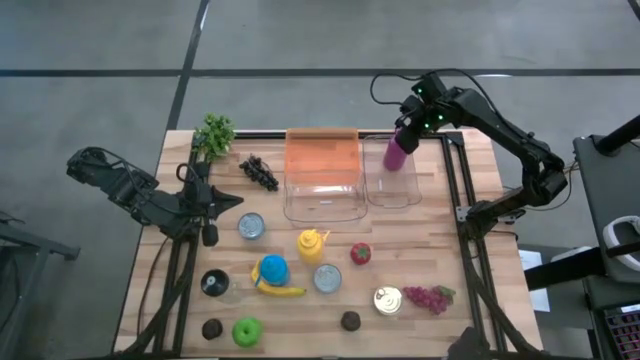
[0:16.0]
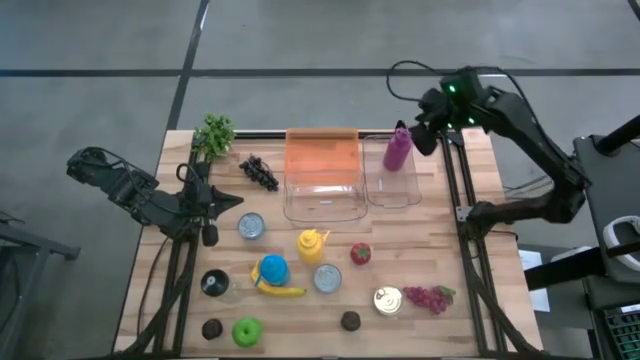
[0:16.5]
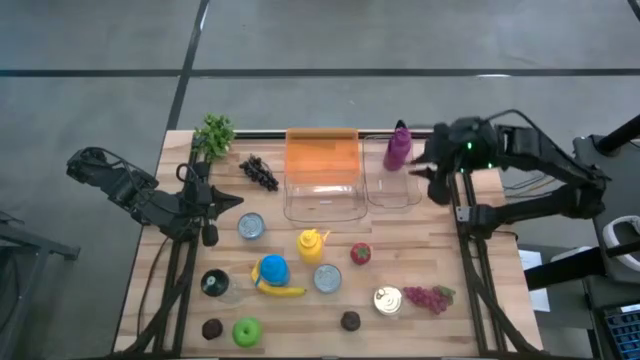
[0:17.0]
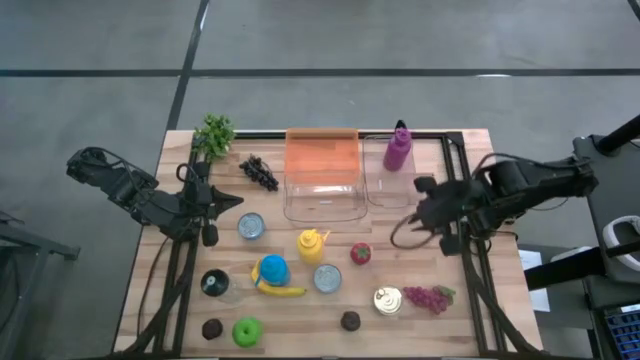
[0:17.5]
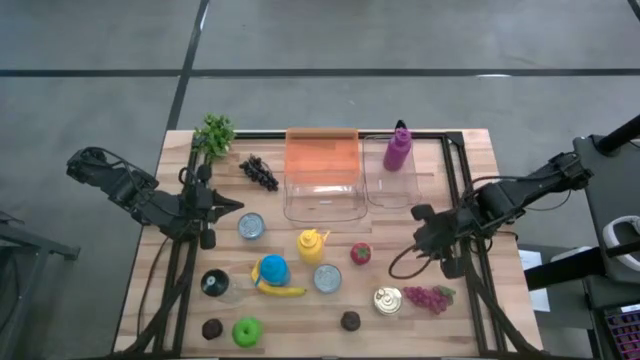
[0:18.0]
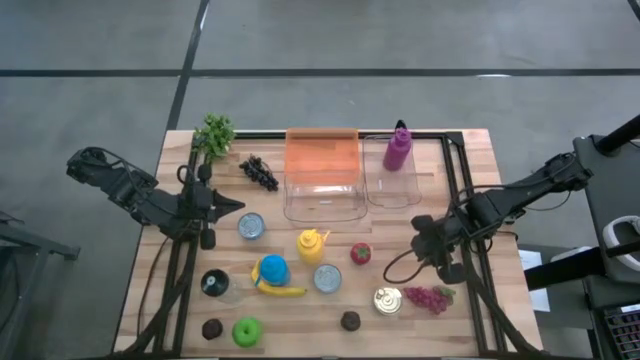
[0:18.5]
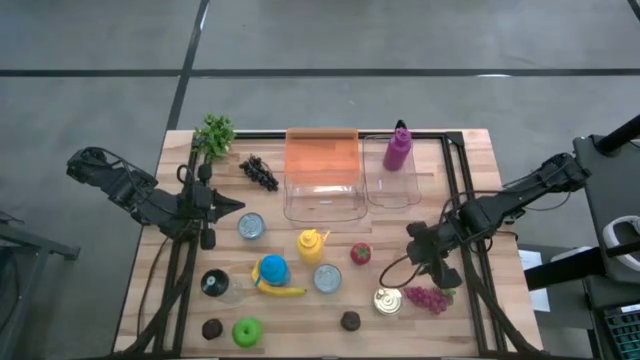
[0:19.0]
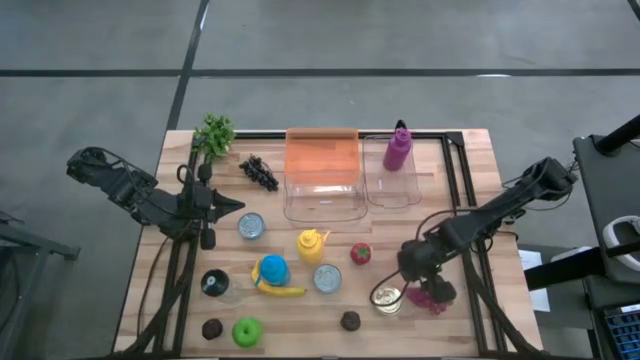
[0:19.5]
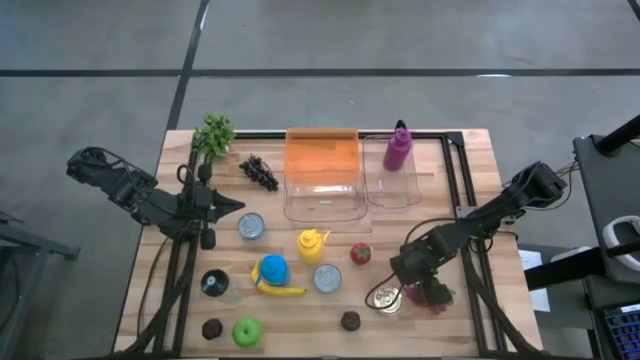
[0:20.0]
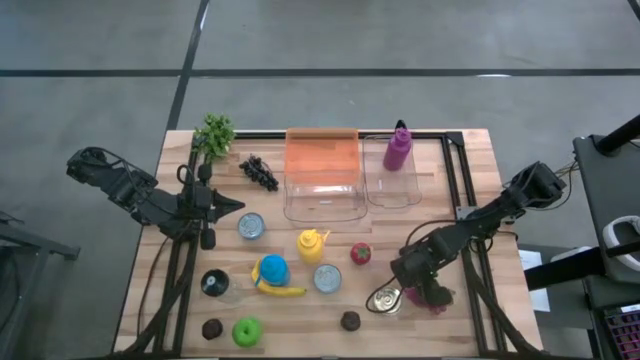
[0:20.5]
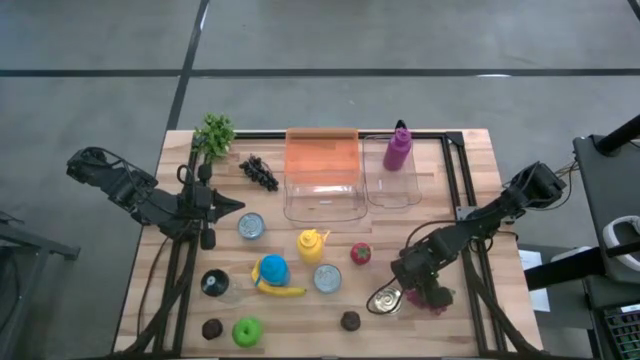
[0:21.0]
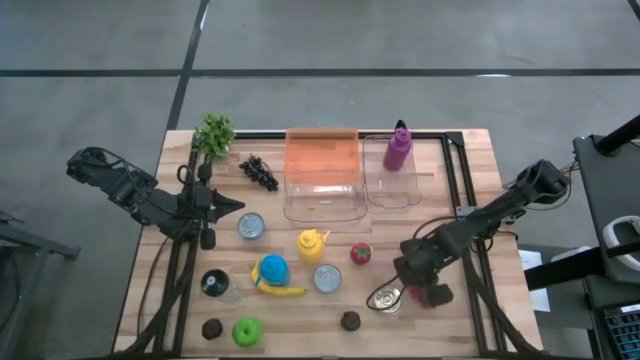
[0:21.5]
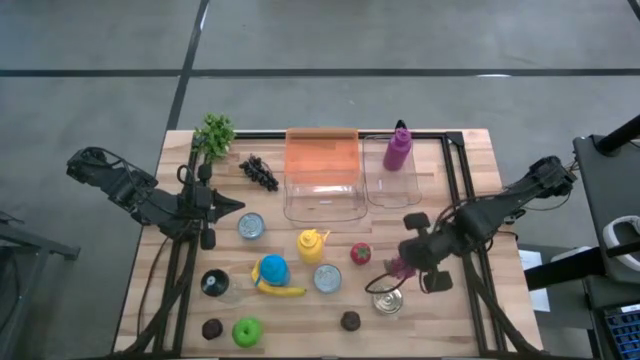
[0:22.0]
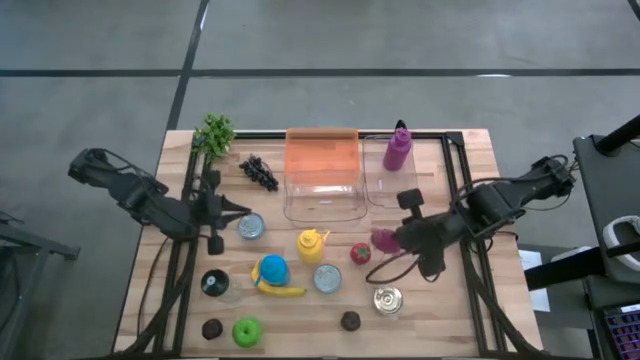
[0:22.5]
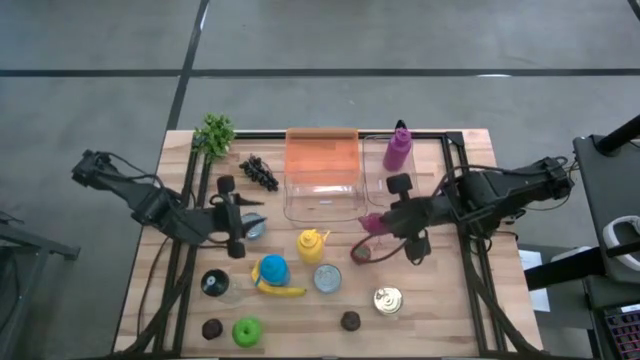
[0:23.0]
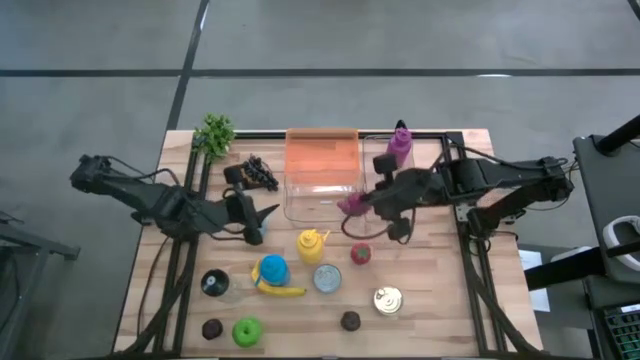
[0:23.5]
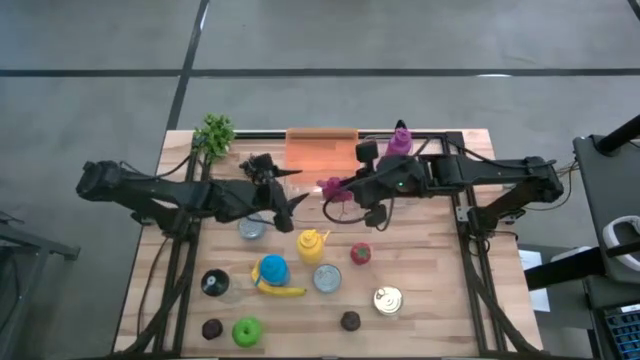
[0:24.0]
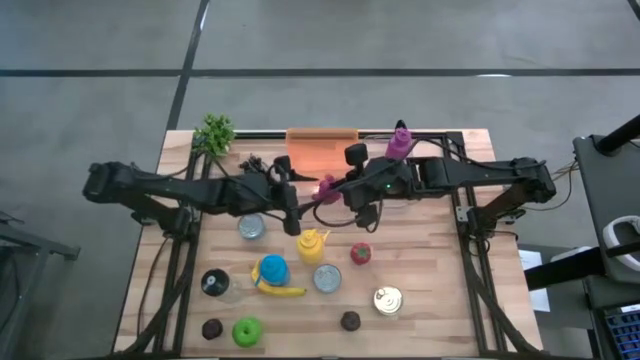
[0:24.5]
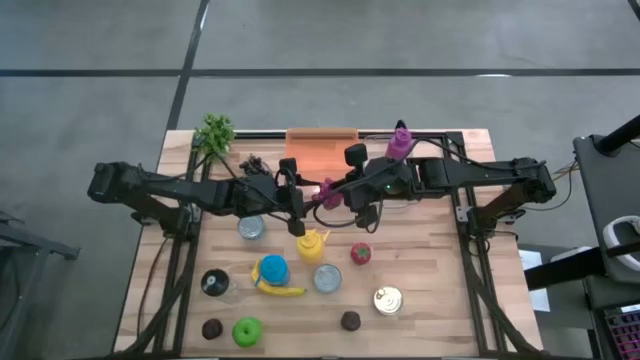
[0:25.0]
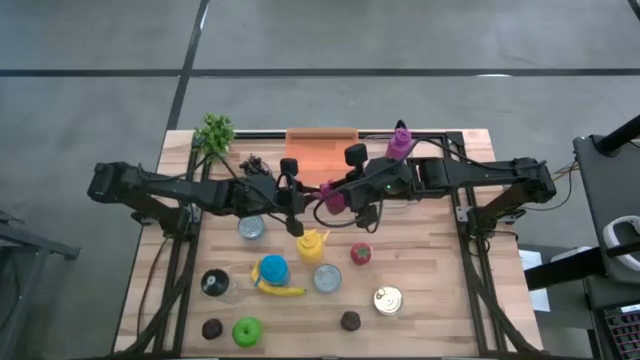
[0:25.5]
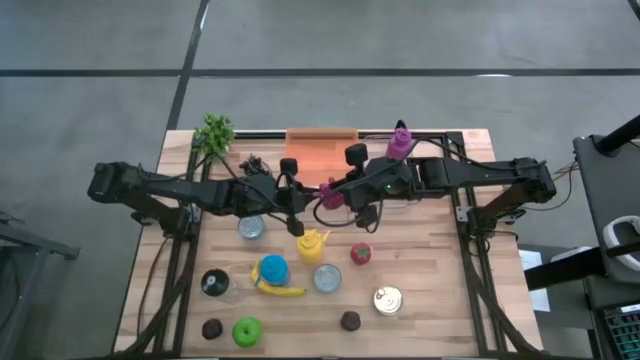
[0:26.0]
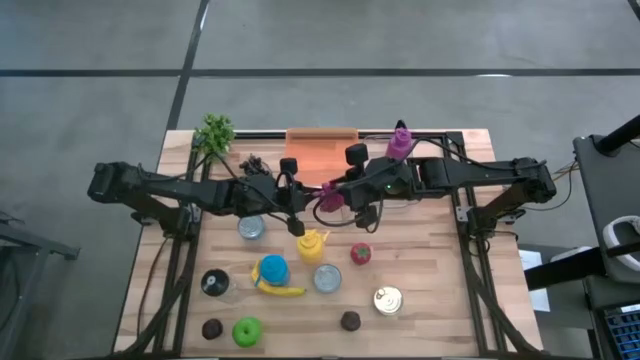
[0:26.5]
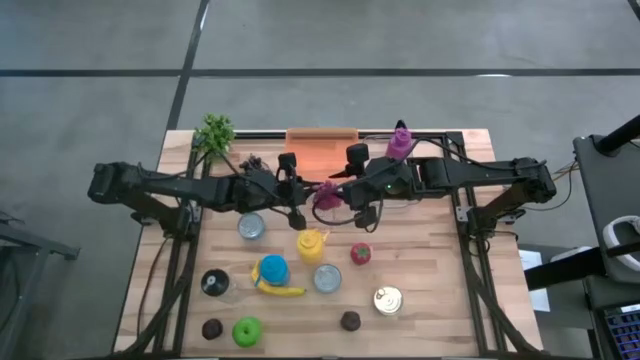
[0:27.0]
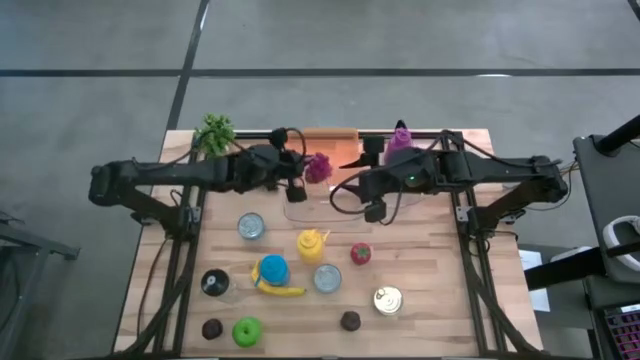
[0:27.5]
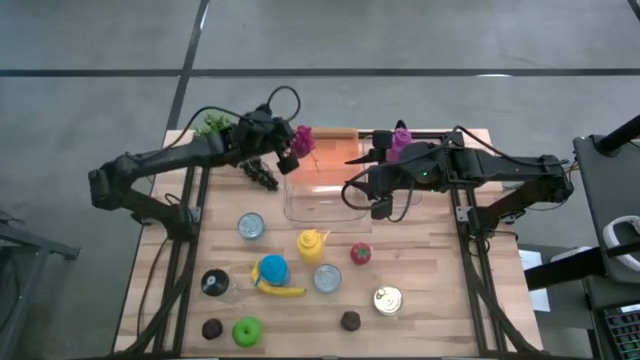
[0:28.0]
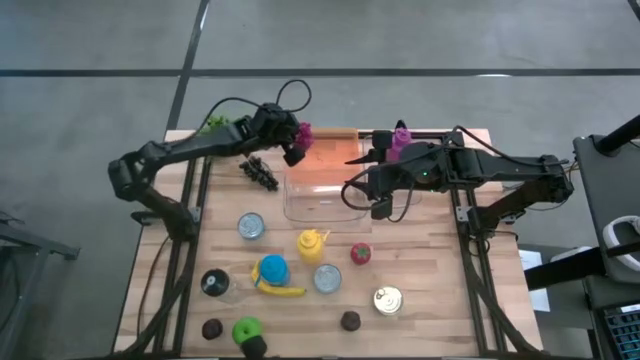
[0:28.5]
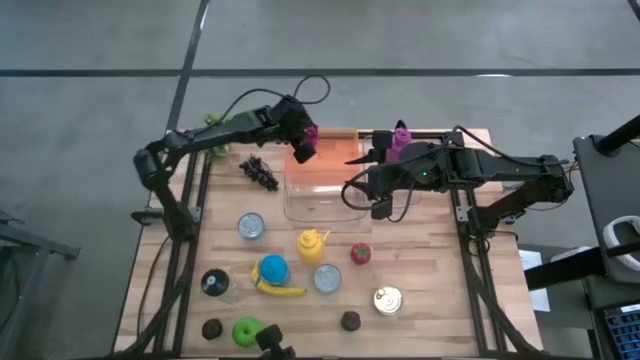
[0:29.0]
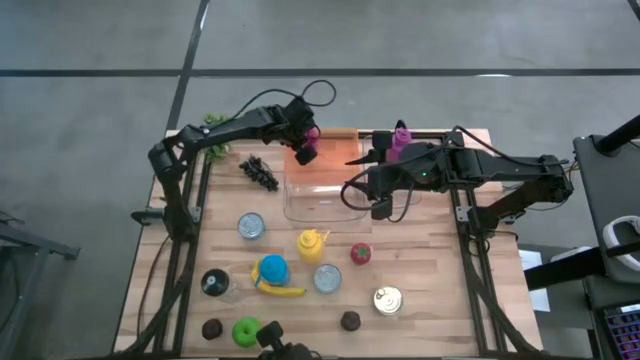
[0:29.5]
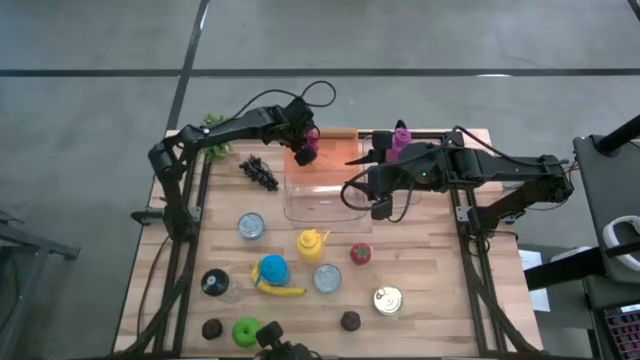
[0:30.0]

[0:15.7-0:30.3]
Task: Pick & Place Food Item
Put the purple grapes into the orange bin

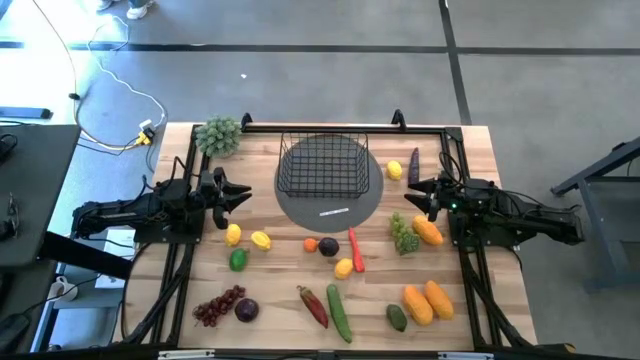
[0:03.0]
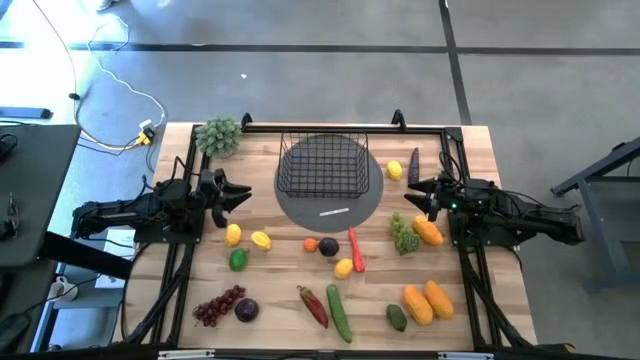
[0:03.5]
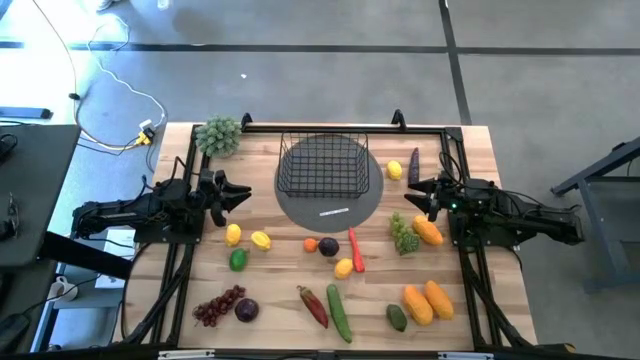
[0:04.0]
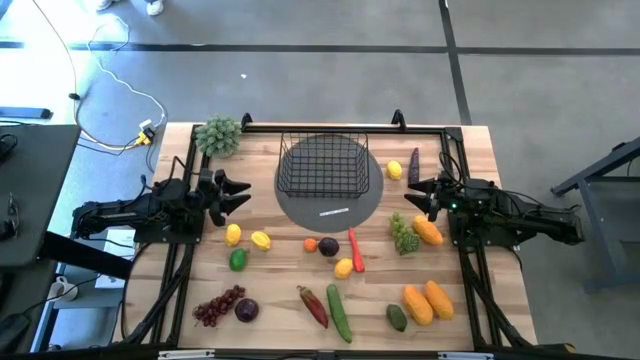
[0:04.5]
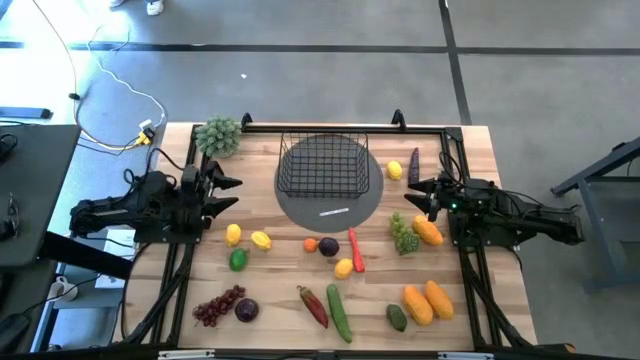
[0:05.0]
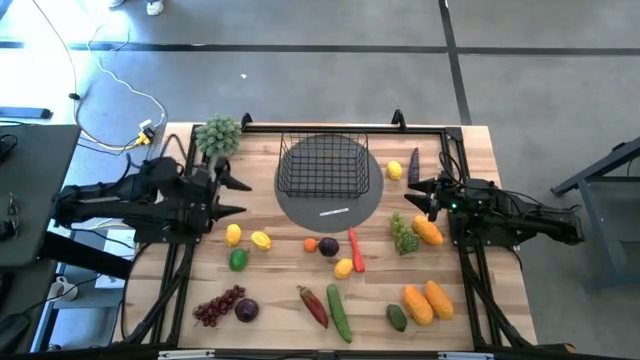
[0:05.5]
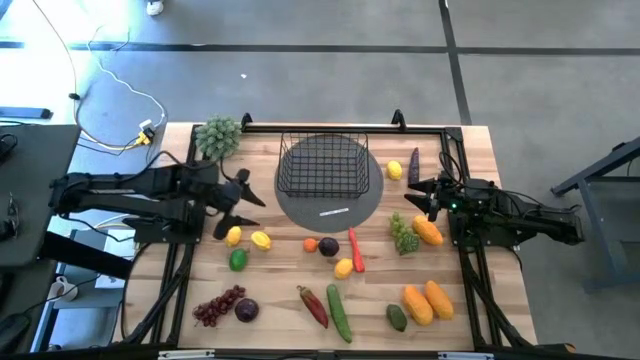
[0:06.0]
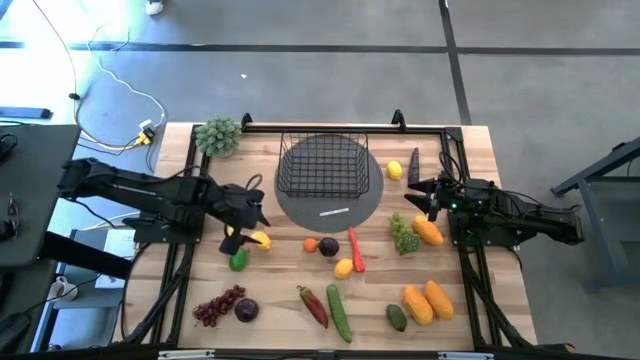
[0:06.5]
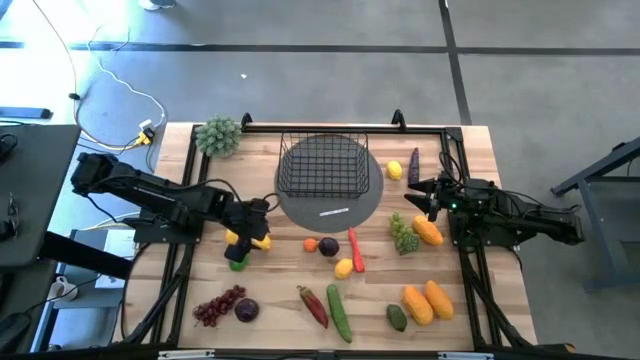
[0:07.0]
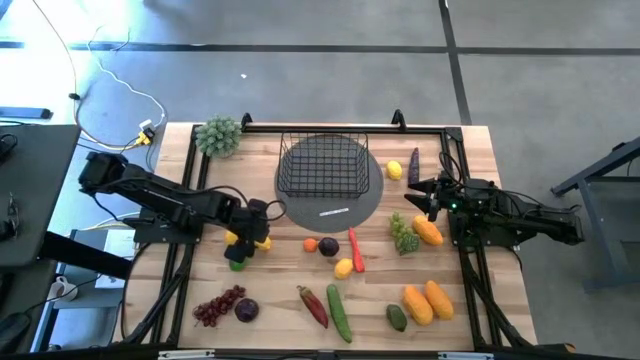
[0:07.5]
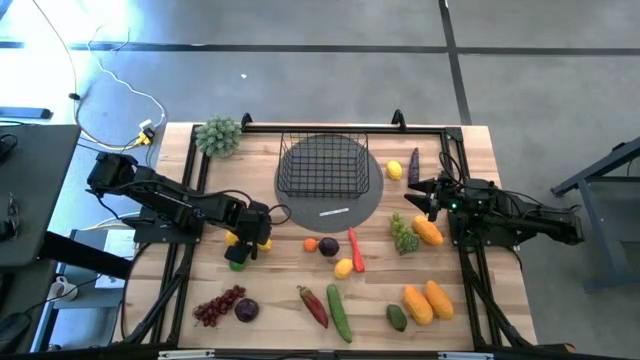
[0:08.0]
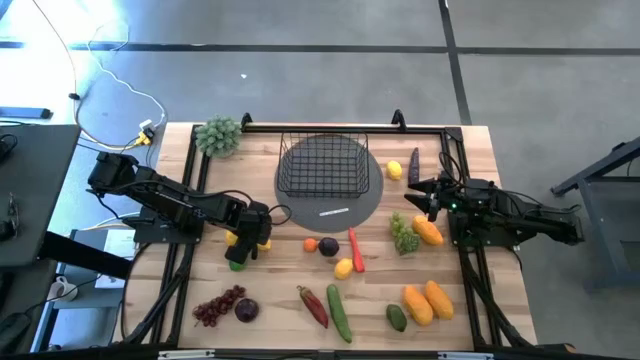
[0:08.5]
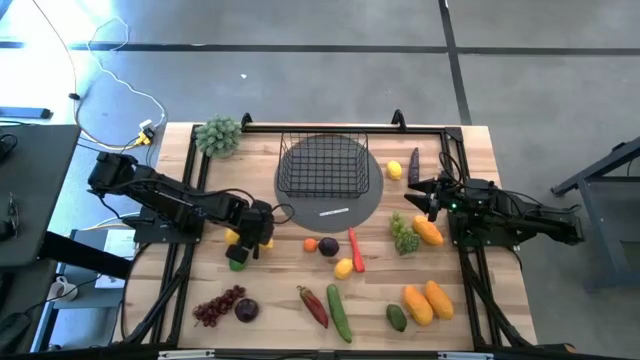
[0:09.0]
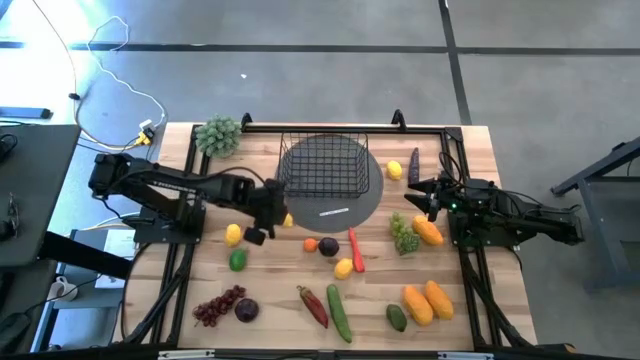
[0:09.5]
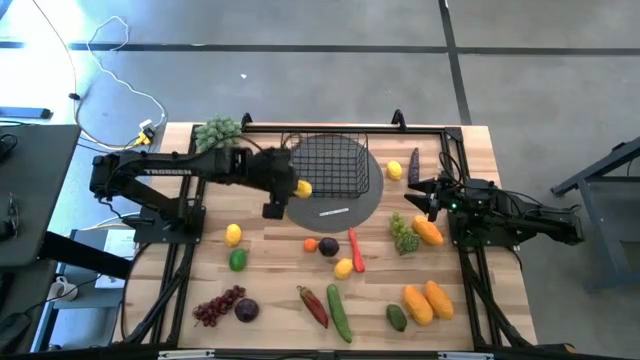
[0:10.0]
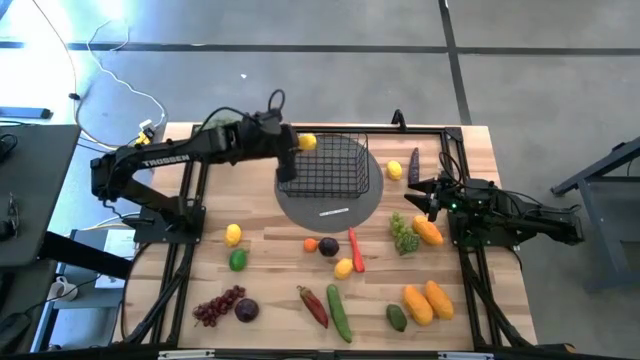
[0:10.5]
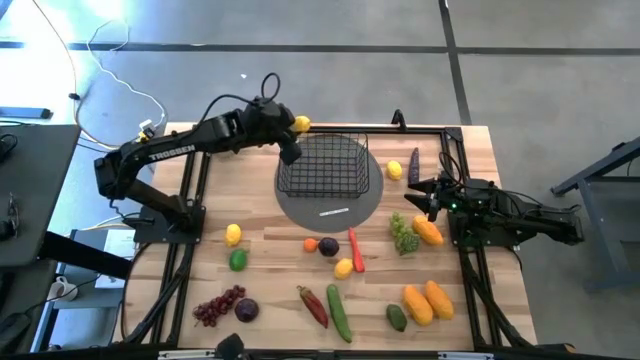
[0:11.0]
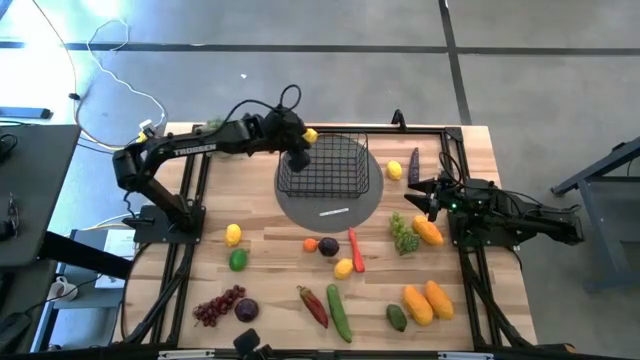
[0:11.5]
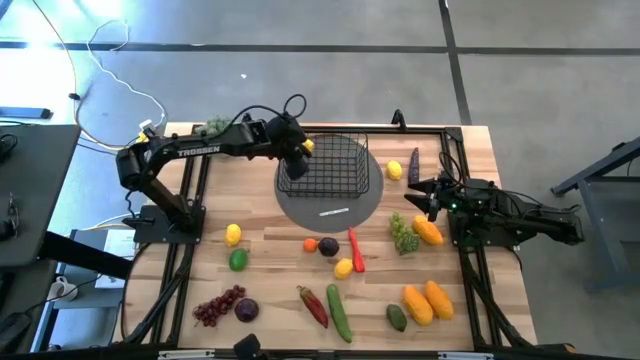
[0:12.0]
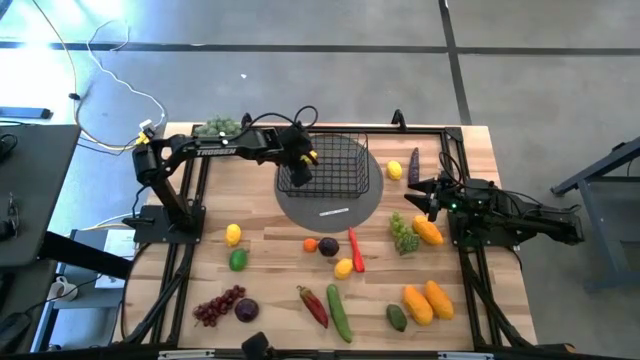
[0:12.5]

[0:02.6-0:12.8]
Task: Build produce basket
Put the lemon into the black wire basket
